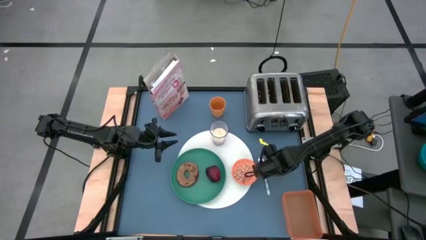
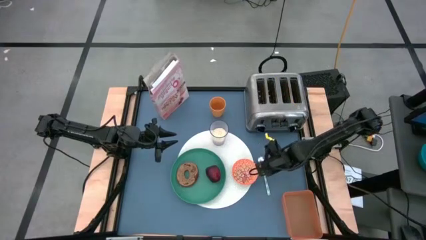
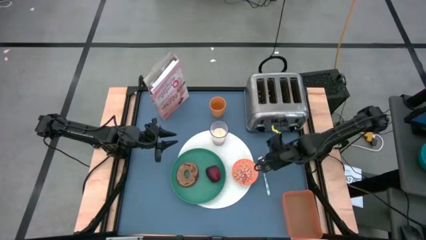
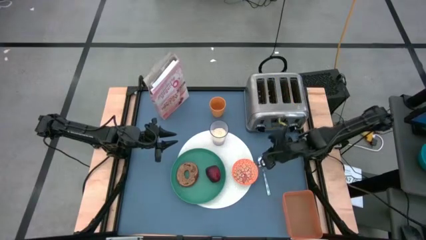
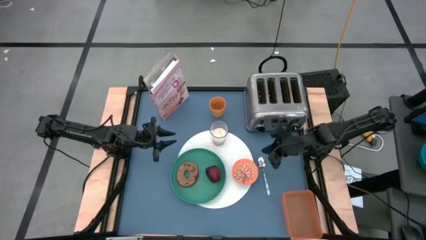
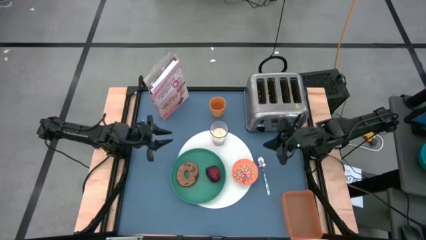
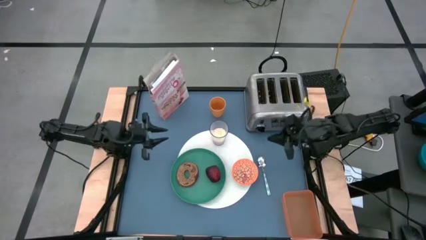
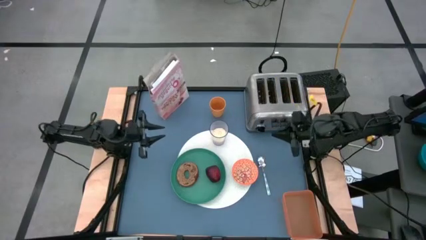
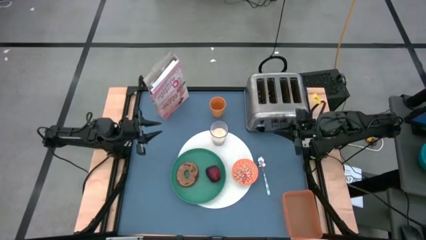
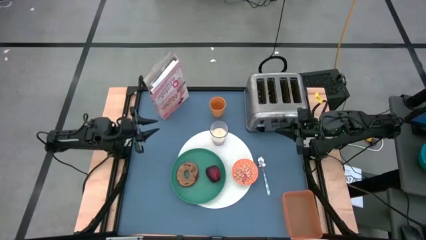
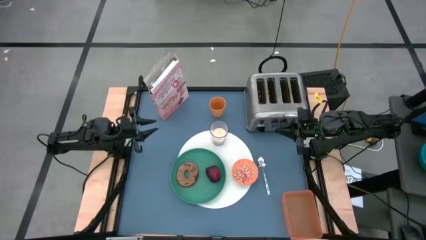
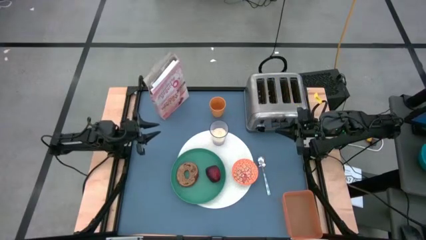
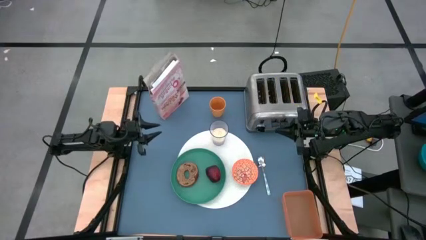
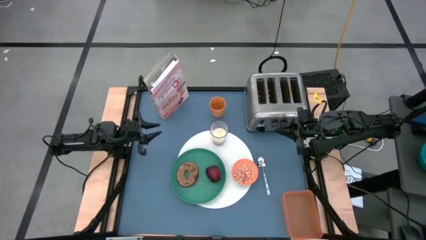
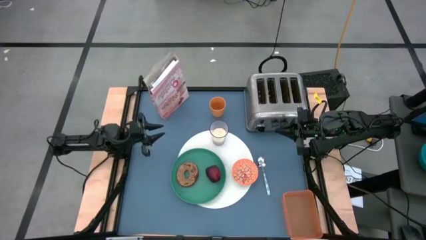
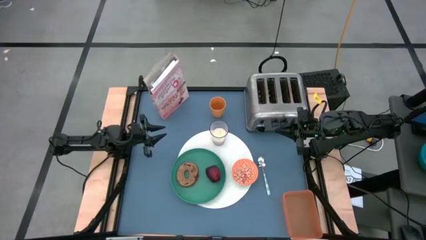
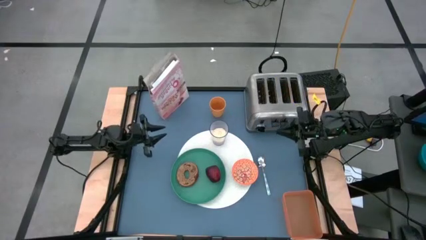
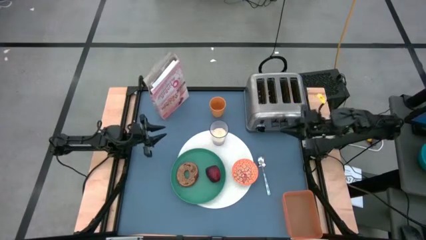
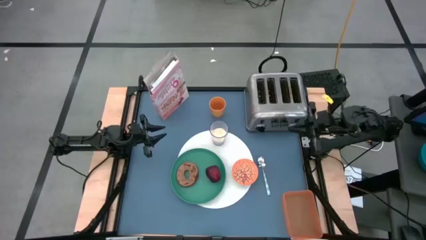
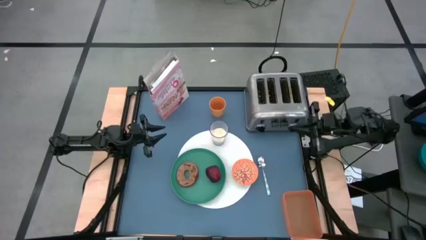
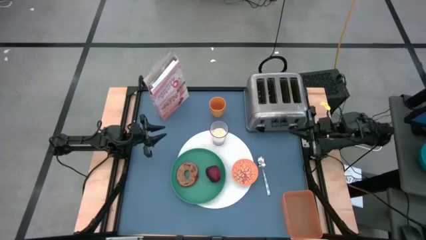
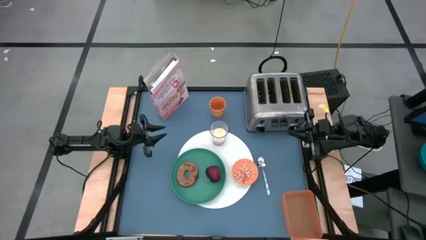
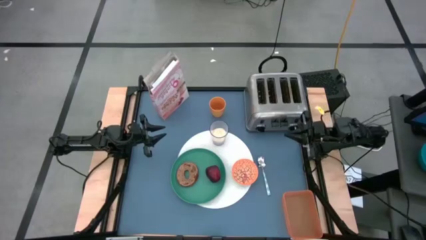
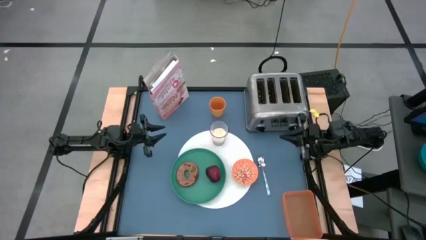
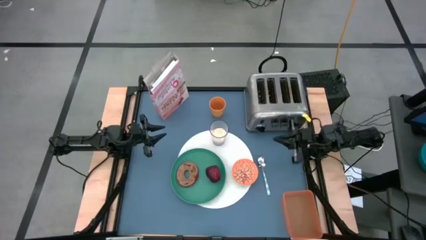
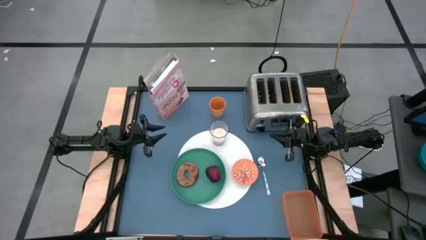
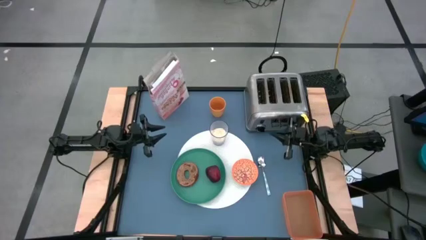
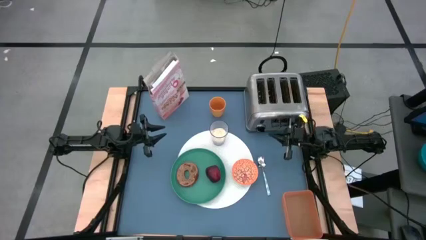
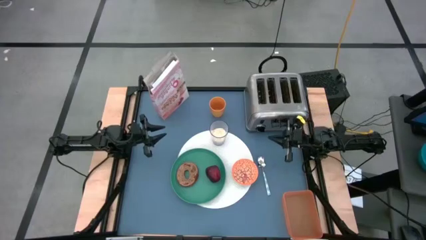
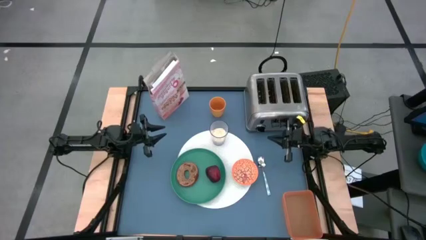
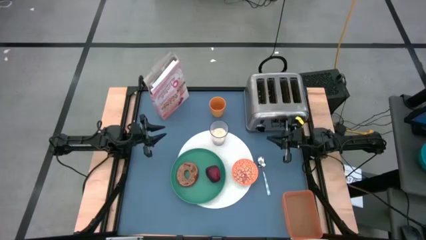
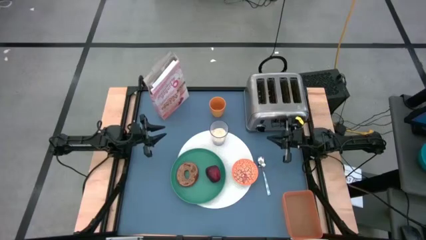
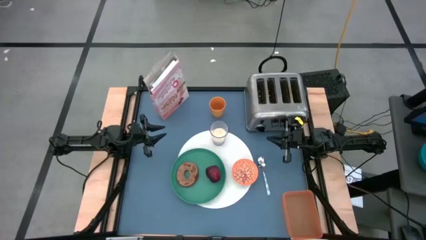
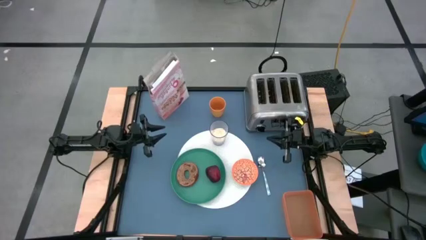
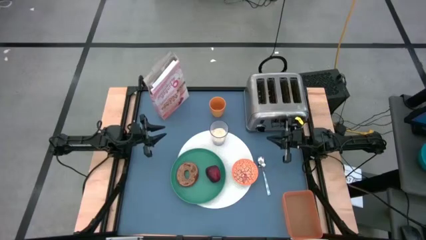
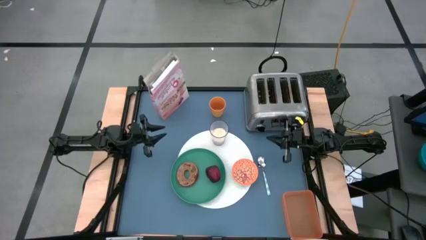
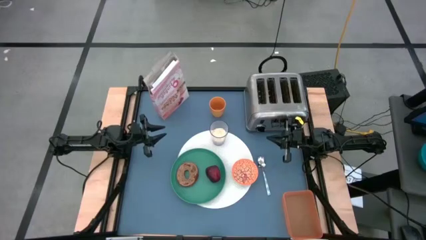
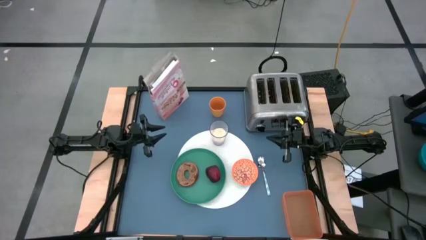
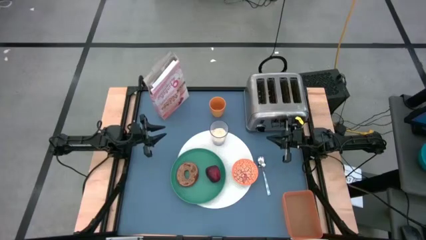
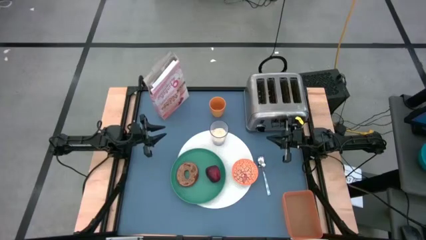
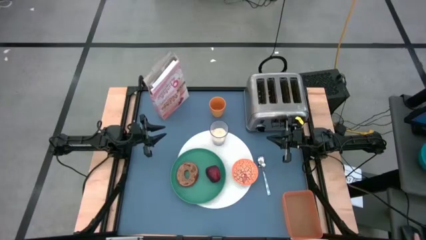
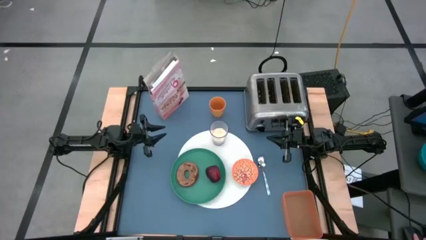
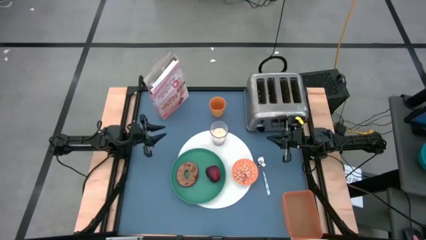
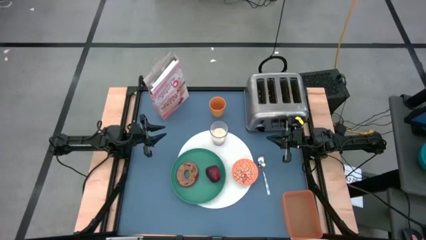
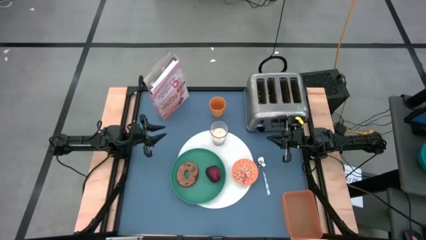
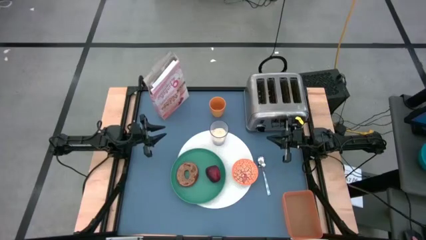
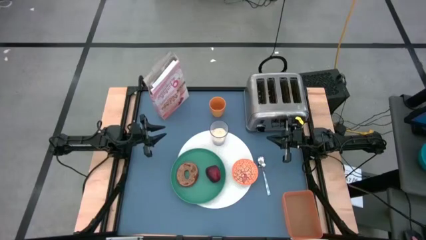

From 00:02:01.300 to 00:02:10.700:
Task: Arrange a breakfast setting
Return to Home Position

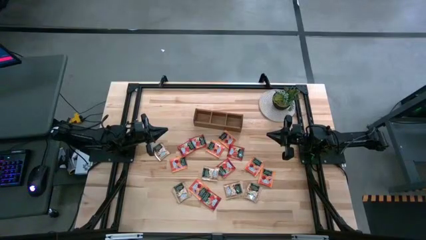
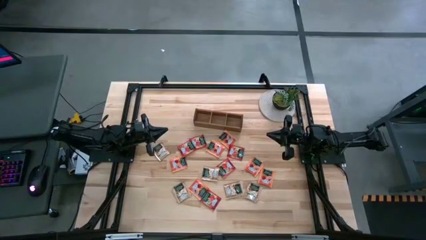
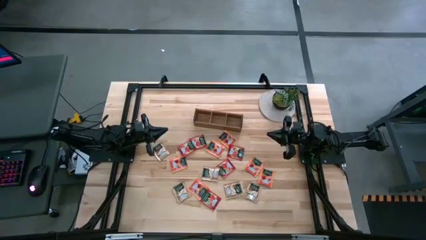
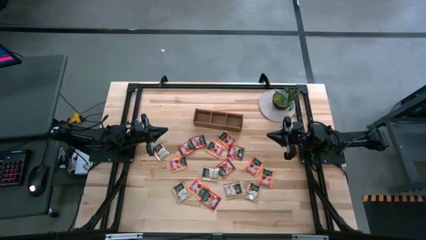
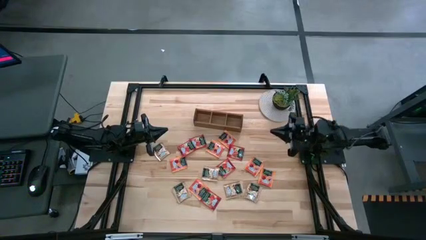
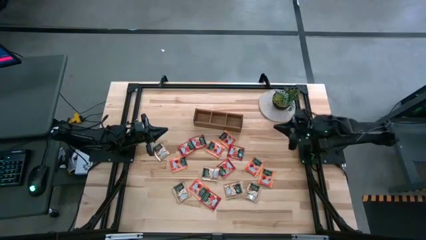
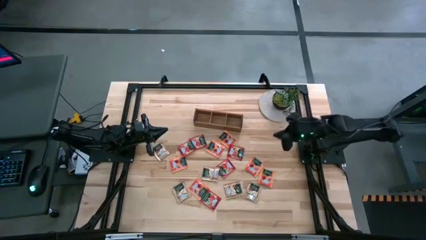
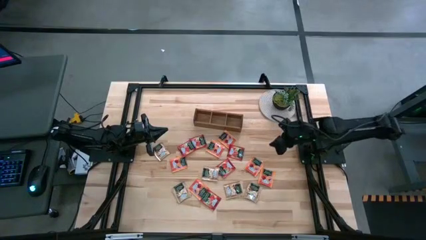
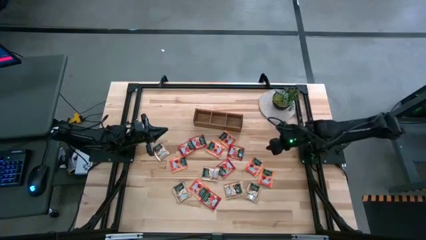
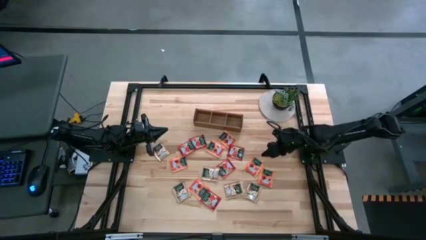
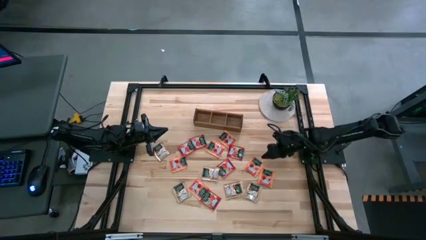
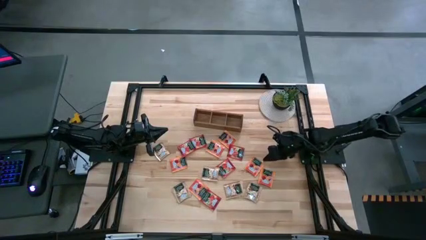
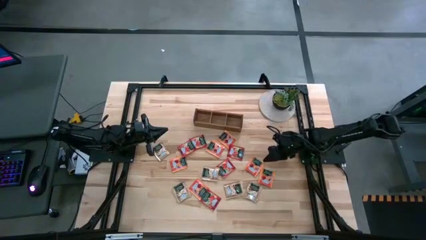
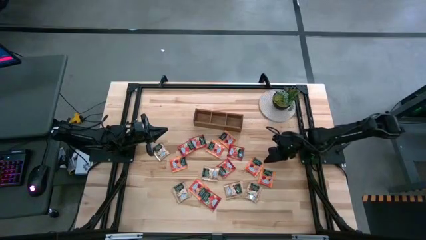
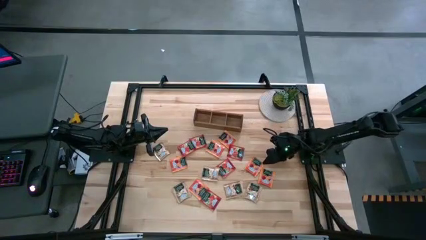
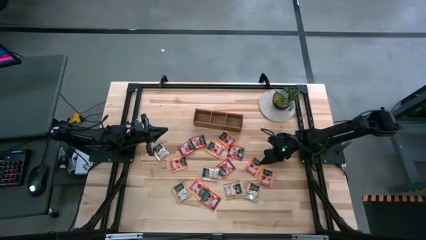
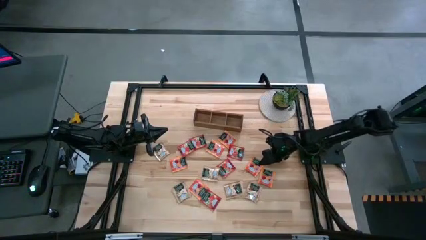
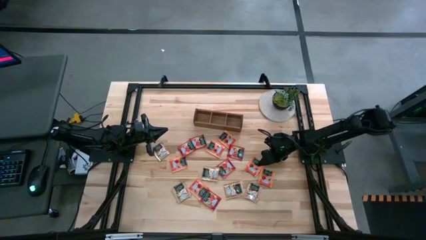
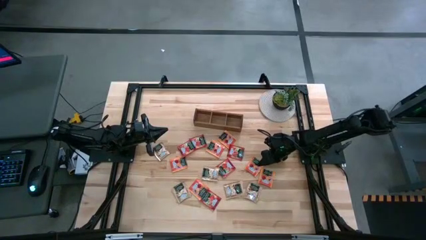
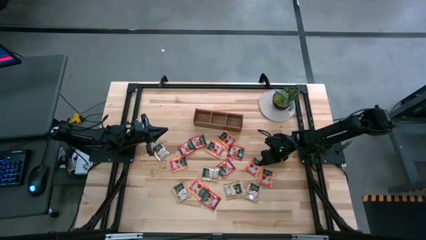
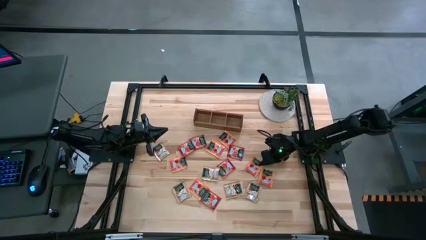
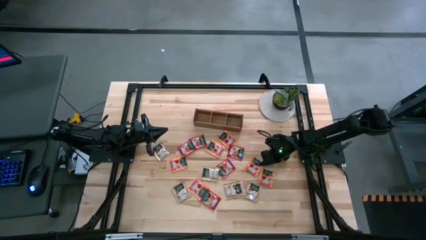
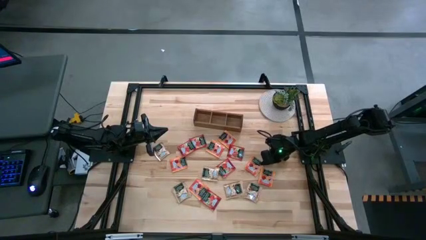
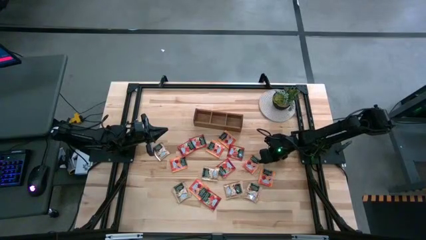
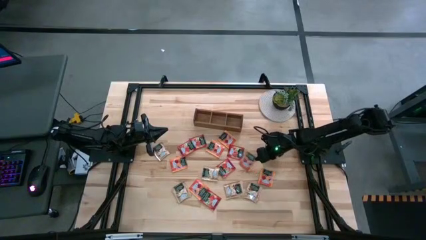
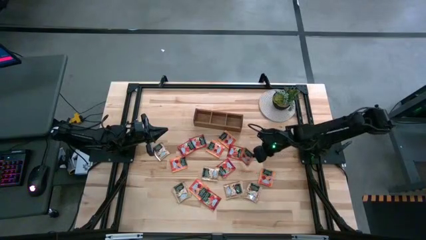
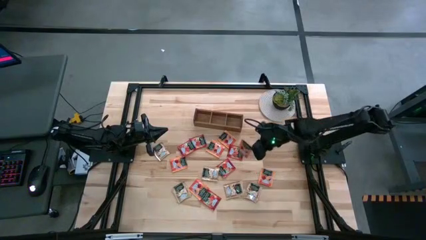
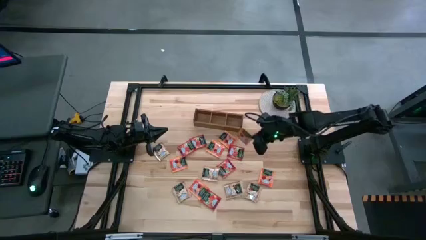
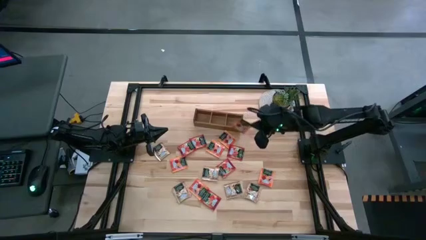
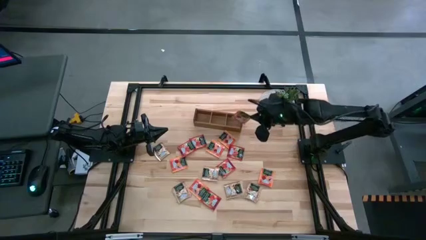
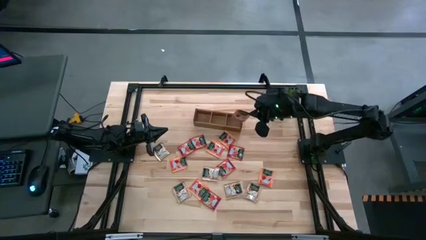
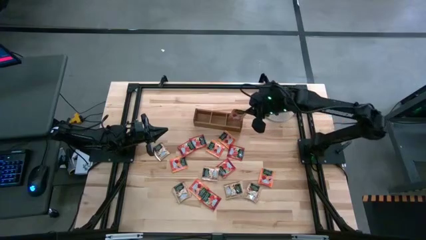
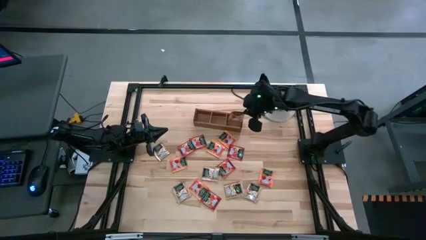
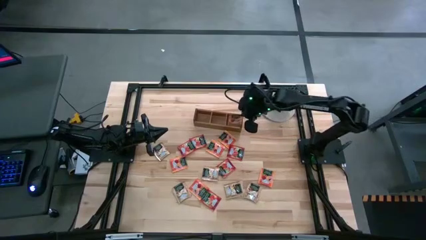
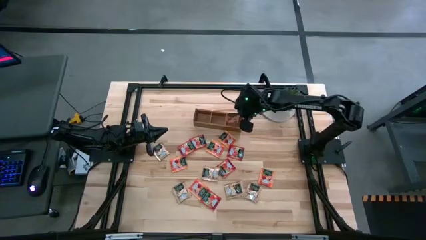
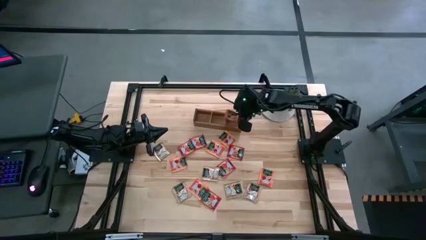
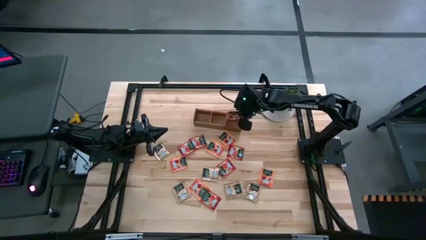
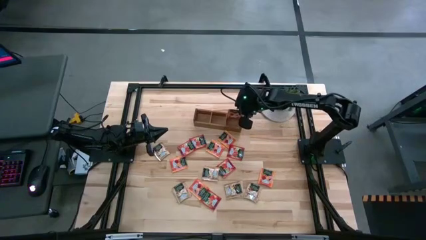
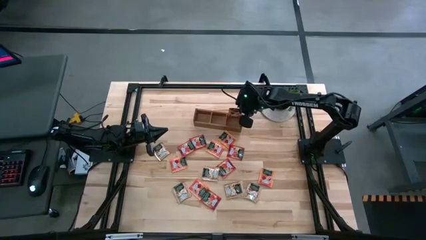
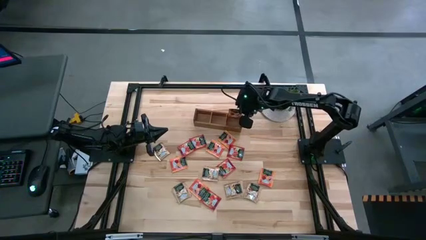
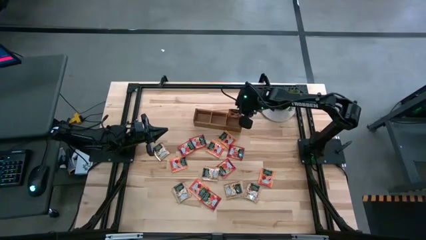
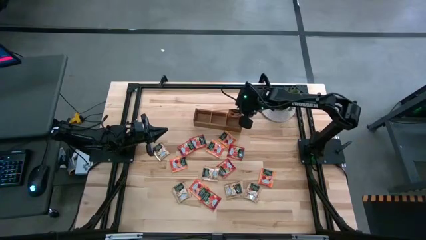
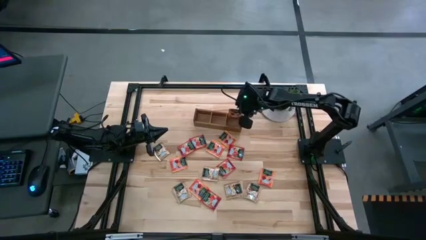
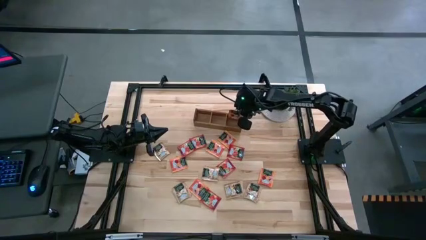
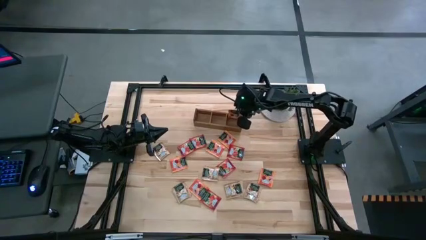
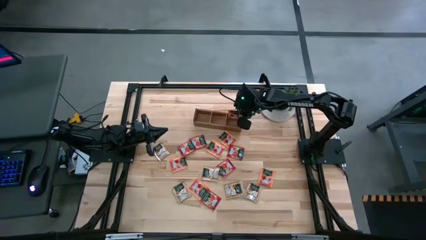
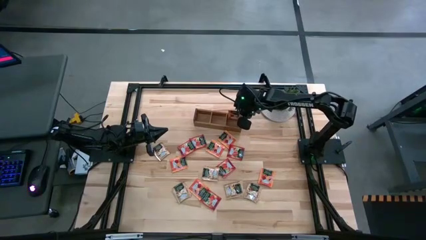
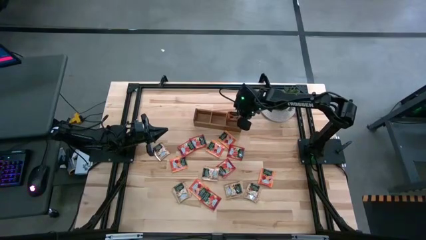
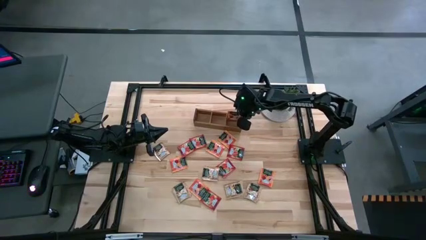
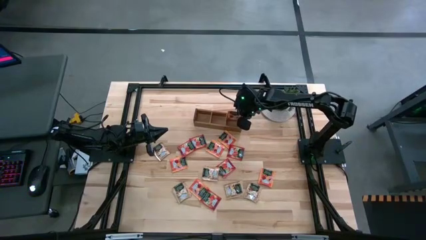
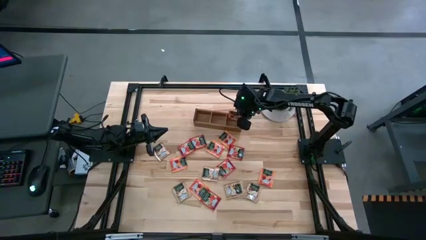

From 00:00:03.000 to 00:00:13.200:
Task: Pick & Place Tea
Put the orange tea bag into the right section of the wooden organizer
